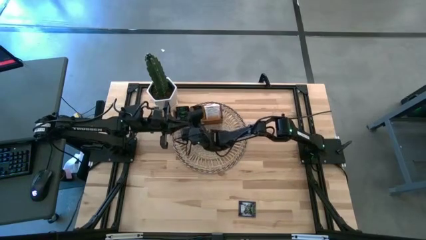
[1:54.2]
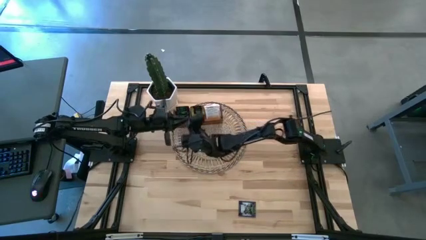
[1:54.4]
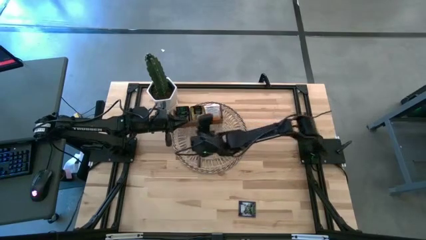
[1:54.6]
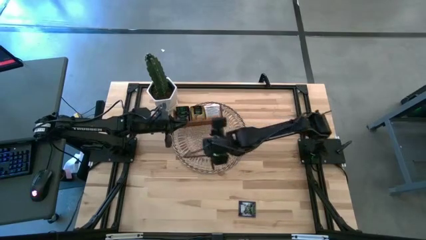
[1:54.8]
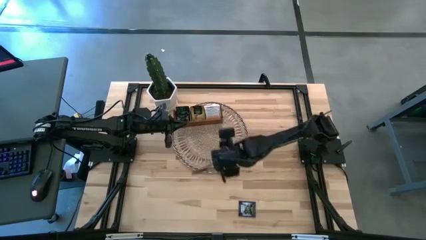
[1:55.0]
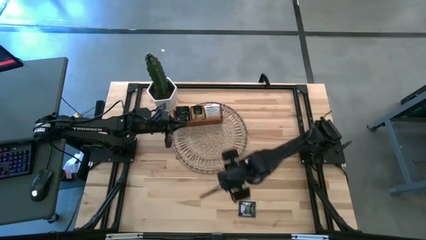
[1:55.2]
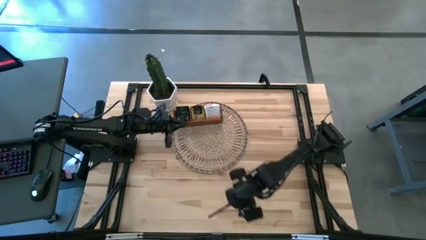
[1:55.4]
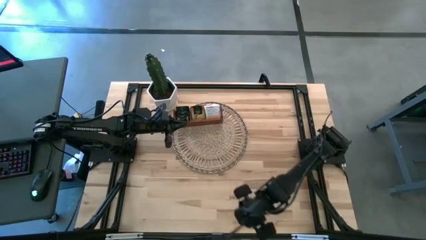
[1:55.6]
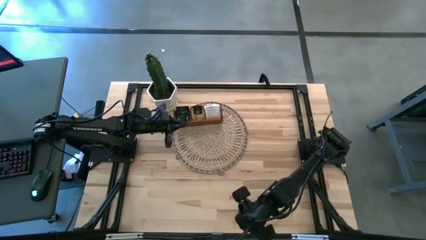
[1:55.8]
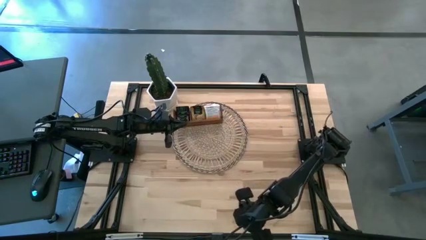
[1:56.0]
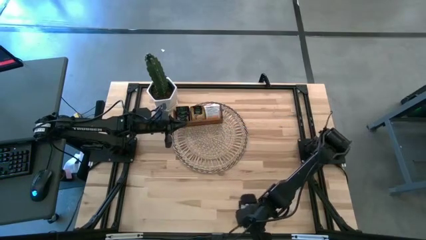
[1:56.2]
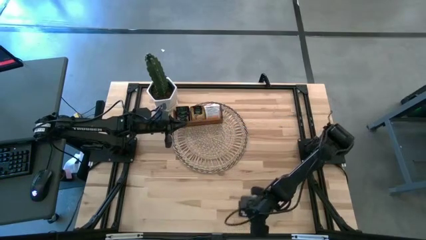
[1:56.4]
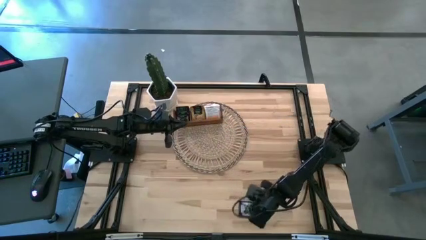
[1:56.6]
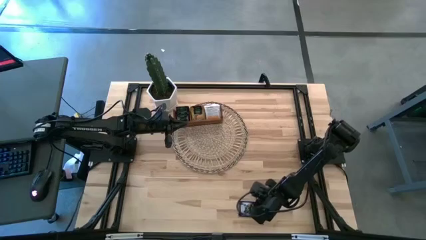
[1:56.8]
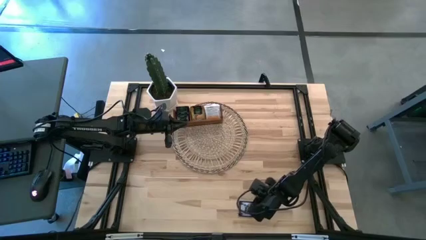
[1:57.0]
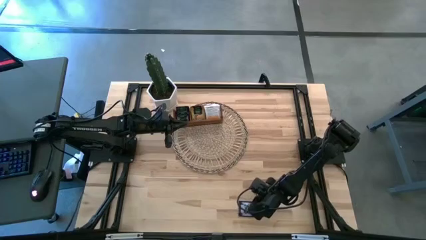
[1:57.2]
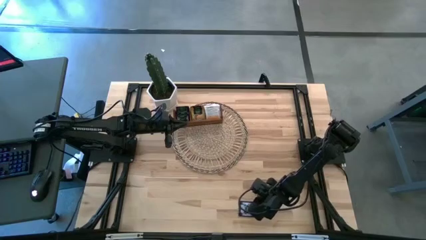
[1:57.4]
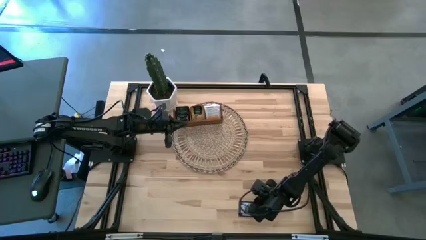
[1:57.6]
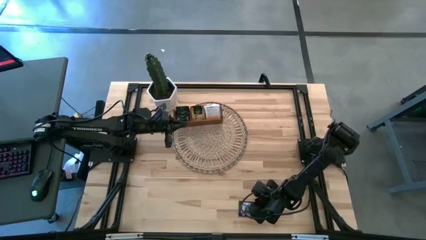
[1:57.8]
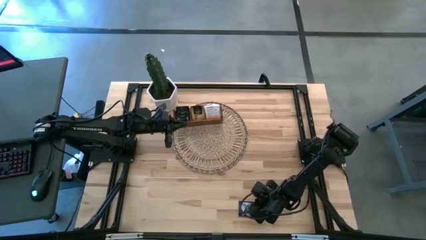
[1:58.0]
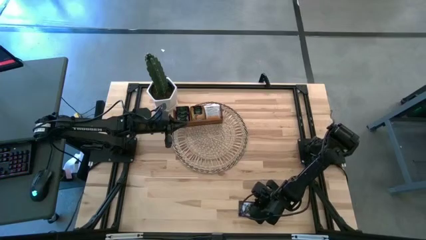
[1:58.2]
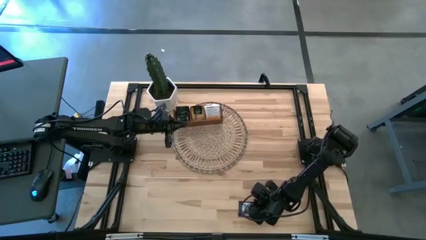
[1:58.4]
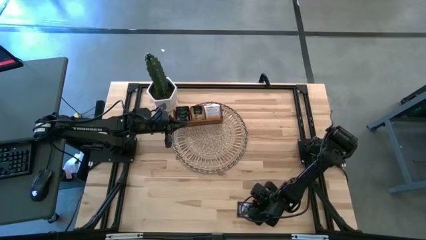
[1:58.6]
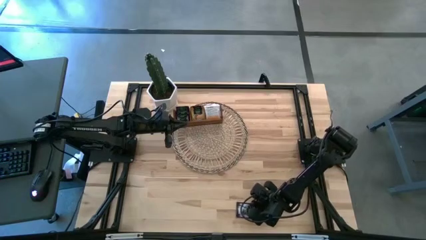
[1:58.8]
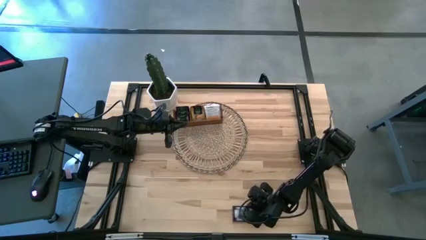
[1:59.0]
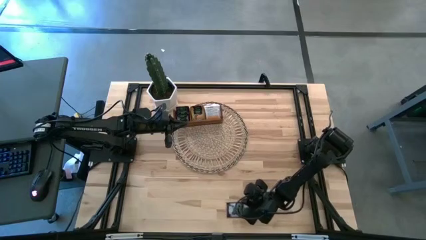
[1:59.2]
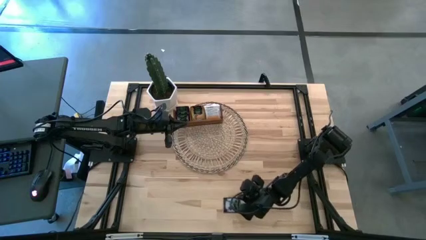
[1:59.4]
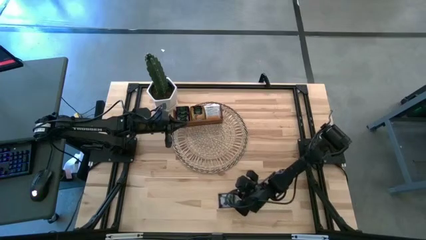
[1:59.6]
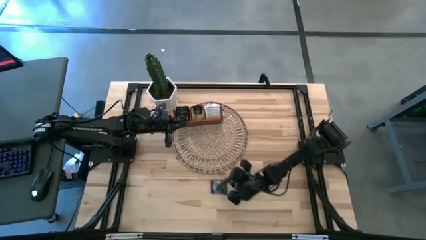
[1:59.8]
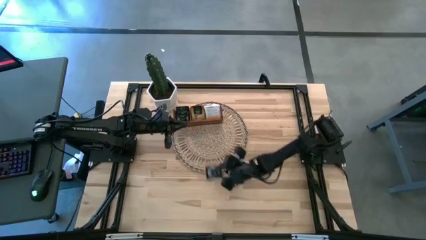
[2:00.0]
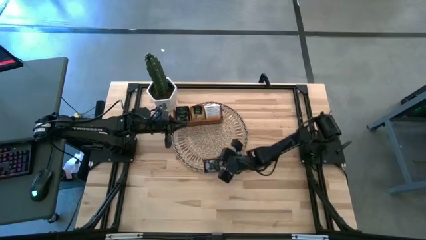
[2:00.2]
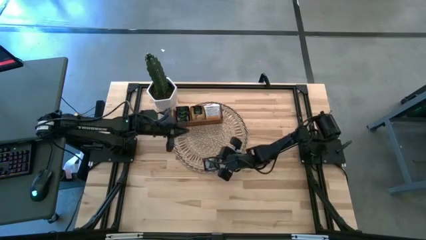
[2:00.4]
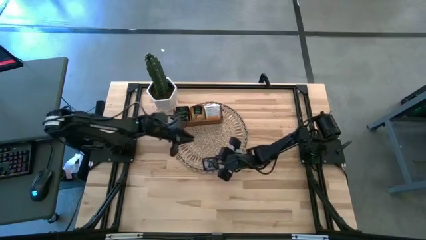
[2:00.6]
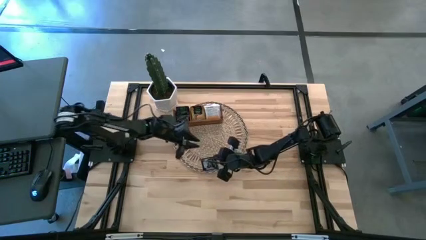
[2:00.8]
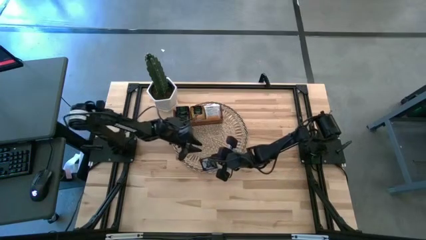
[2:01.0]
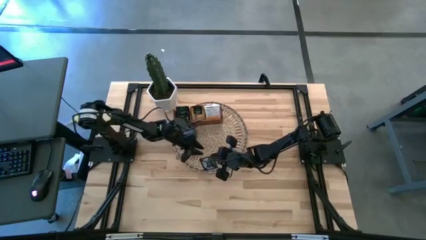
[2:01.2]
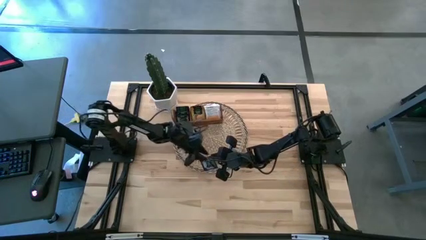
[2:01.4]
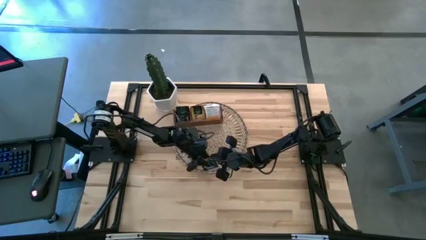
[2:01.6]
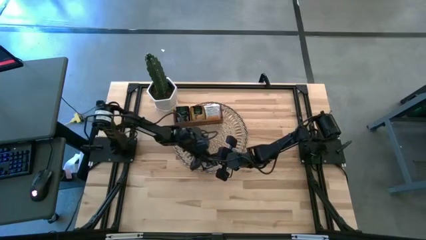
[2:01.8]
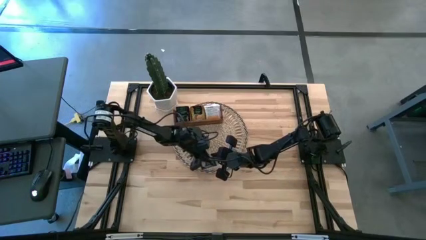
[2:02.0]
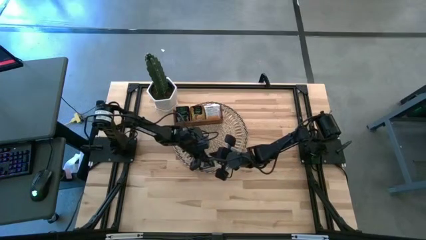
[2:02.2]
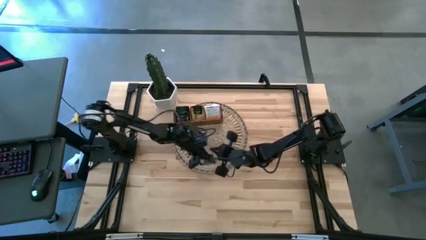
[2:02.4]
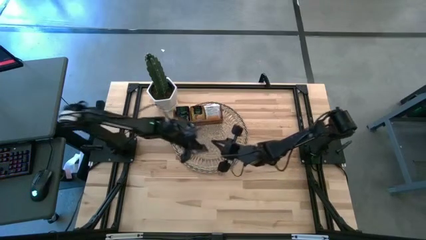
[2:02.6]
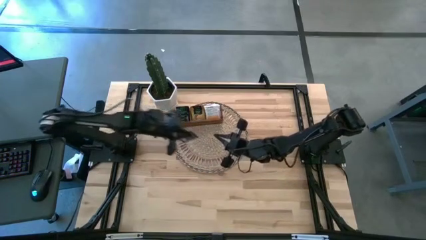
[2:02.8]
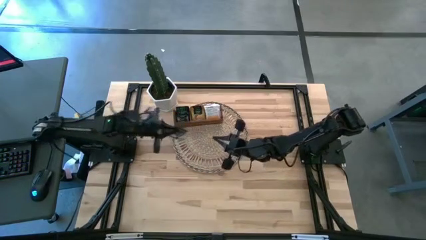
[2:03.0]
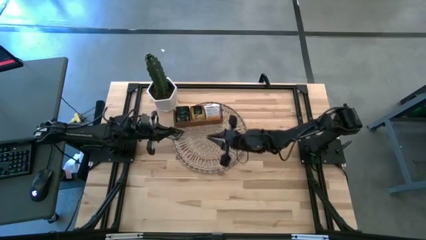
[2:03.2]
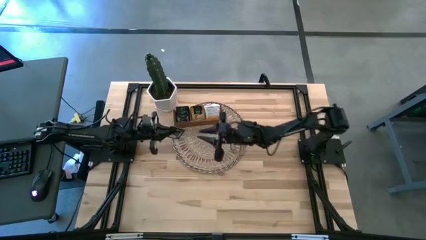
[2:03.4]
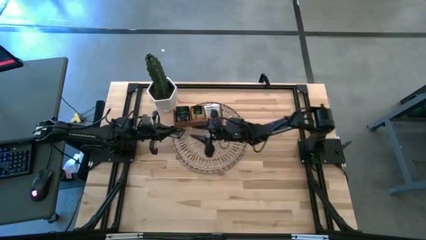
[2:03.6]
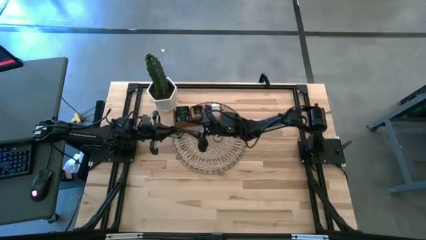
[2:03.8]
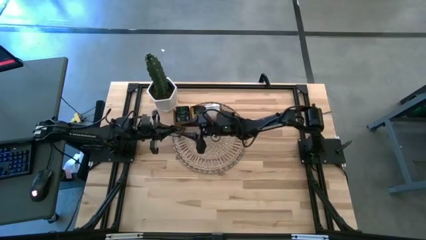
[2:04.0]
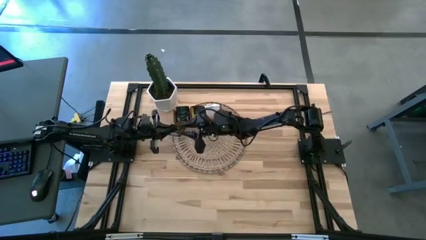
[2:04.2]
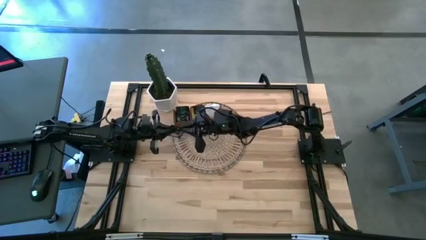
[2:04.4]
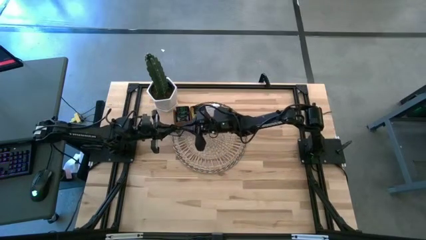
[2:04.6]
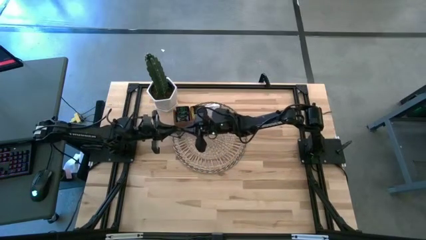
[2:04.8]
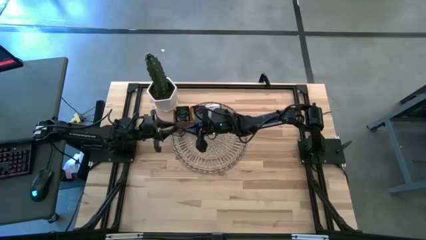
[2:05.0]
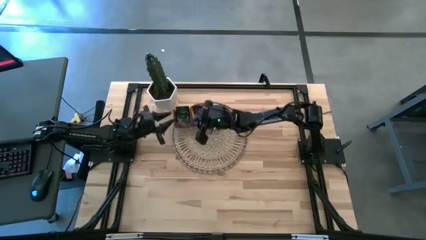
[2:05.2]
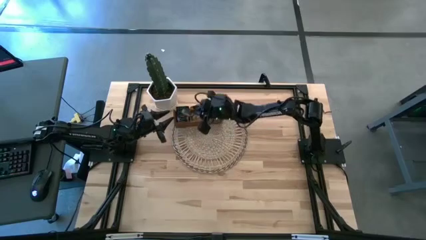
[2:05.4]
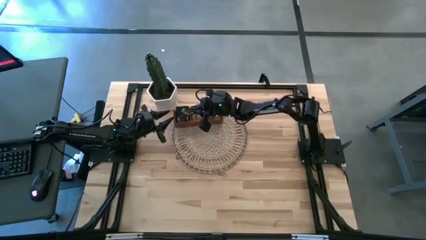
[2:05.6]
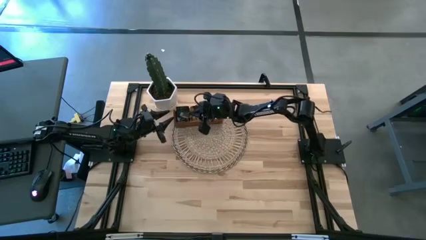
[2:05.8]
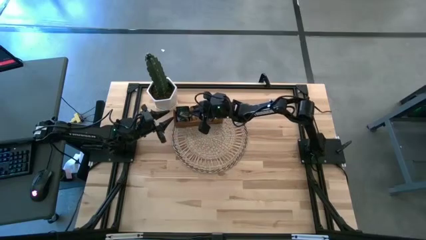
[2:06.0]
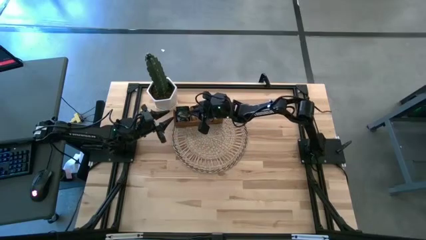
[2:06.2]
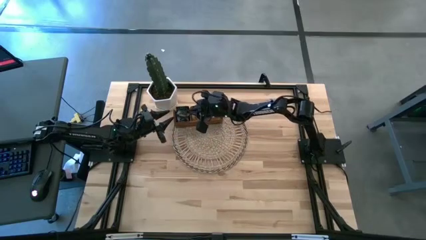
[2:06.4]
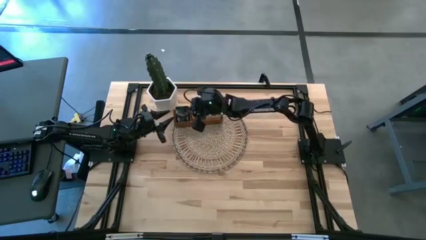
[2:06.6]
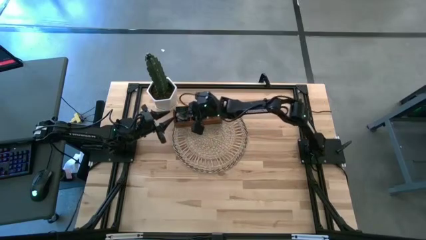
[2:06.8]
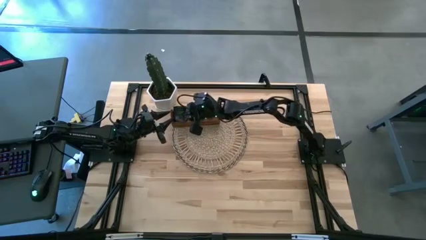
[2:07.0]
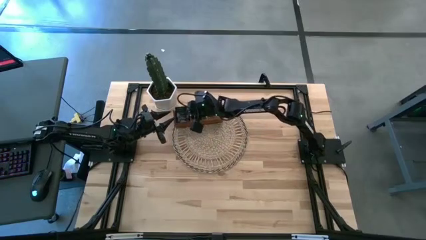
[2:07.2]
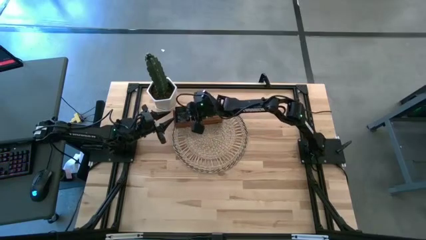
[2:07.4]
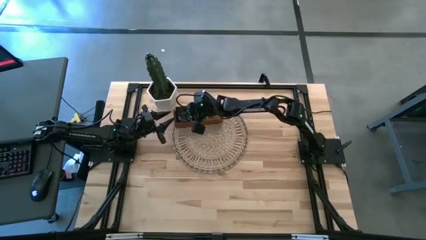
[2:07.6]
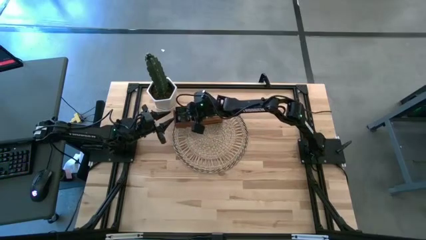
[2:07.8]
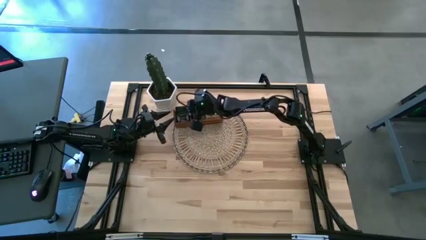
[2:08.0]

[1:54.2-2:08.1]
Task: Pick & Place Tea
Put the black tea bag into the left section of the wooden organizer

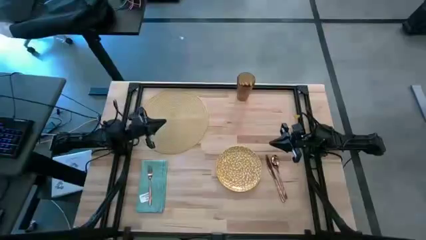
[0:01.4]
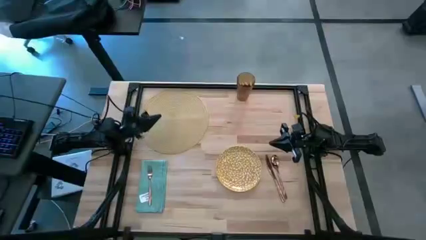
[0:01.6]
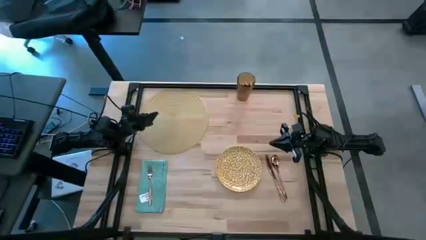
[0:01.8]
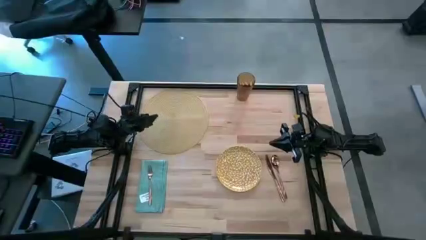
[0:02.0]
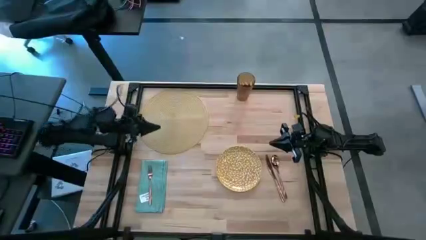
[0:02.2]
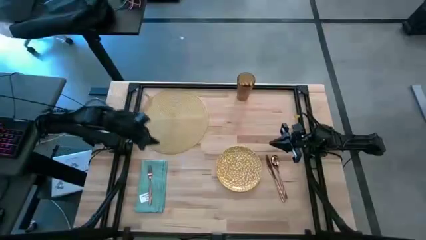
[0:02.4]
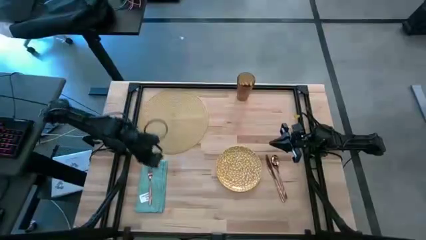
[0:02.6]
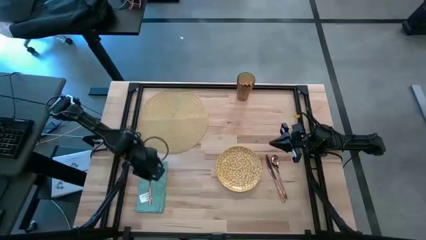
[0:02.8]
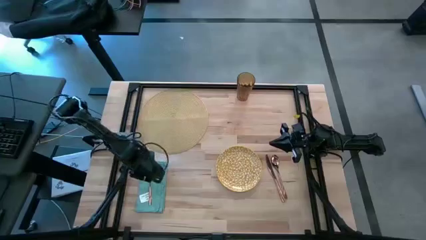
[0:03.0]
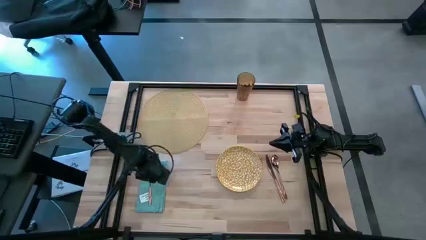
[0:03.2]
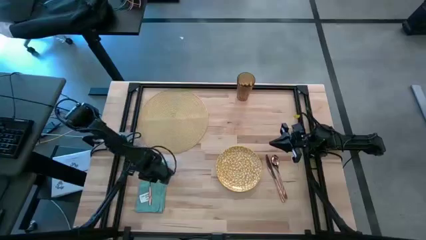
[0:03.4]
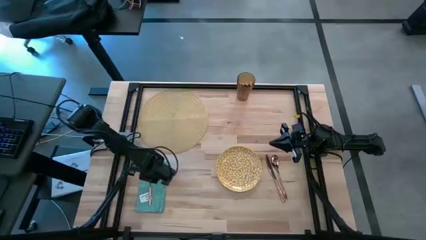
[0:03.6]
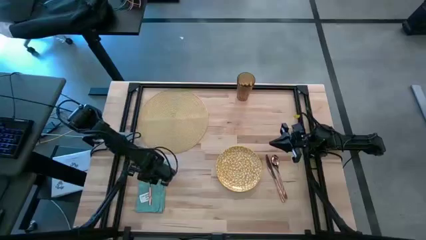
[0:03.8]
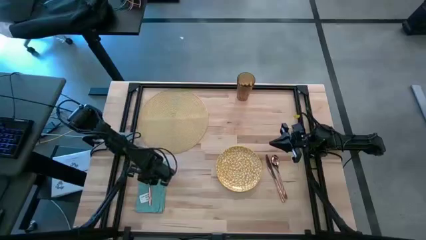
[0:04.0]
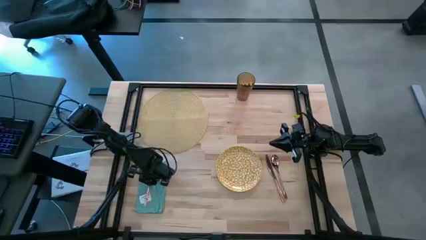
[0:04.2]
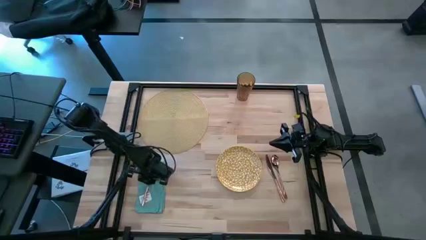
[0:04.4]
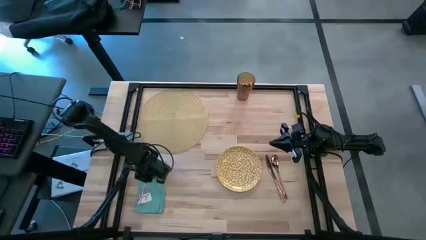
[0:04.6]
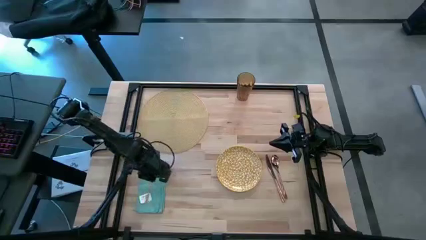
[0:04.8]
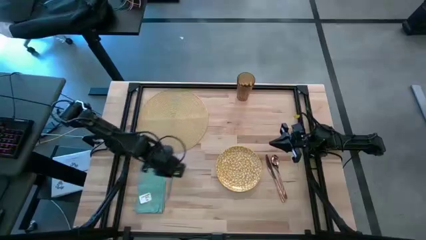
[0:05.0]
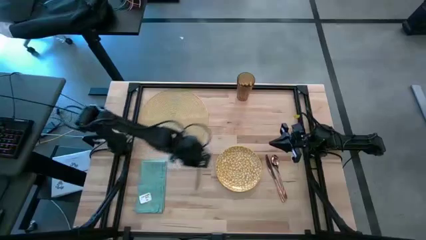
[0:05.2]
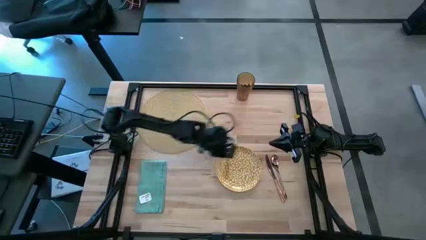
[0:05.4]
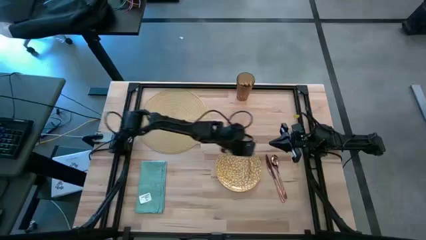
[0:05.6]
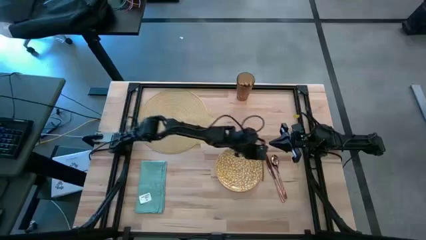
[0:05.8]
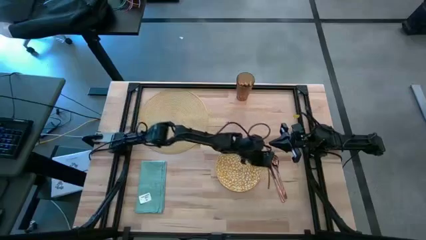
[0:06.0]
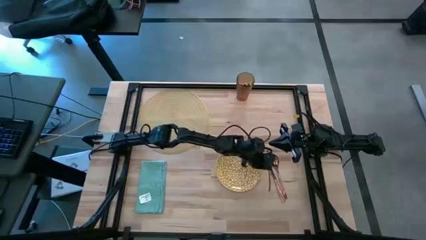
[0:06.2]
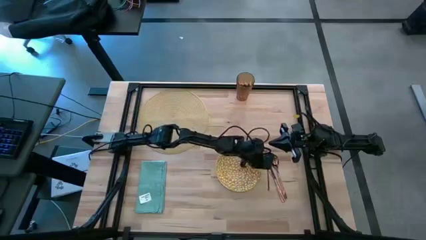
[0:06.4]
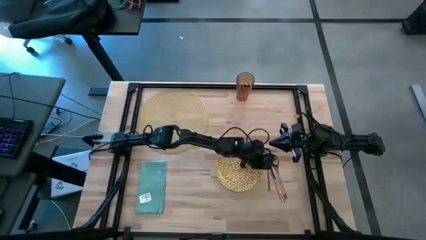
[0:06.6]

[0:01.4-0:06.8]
Task: Set table place
Move the bronze fork to the middle right of the table
